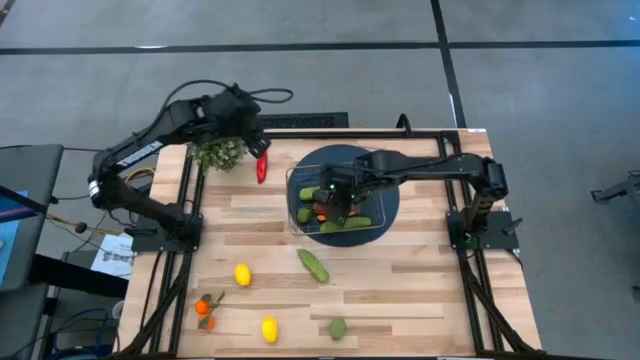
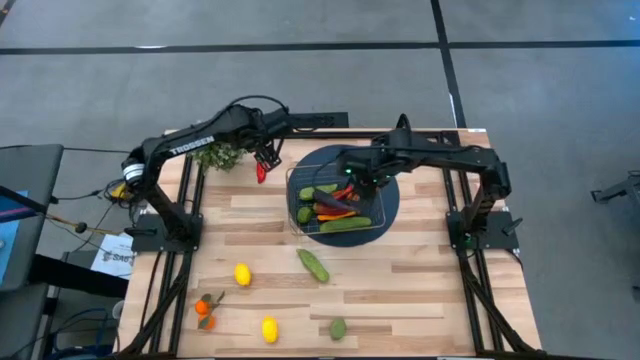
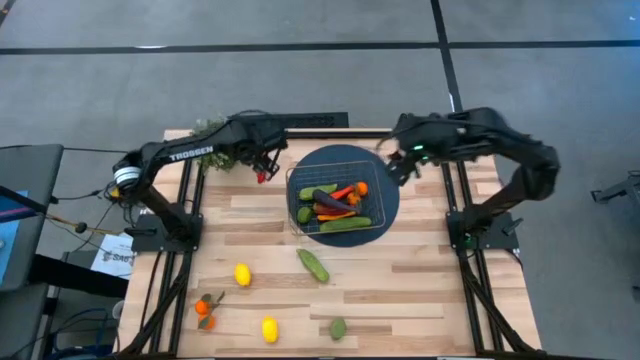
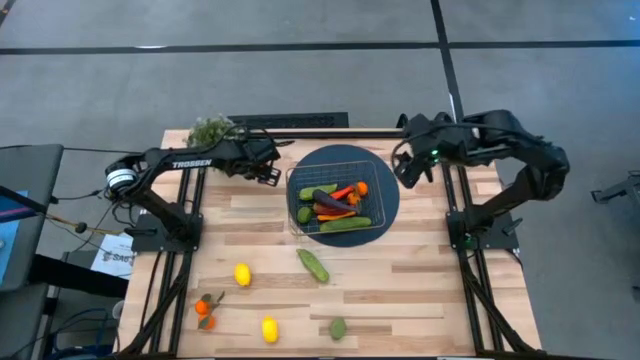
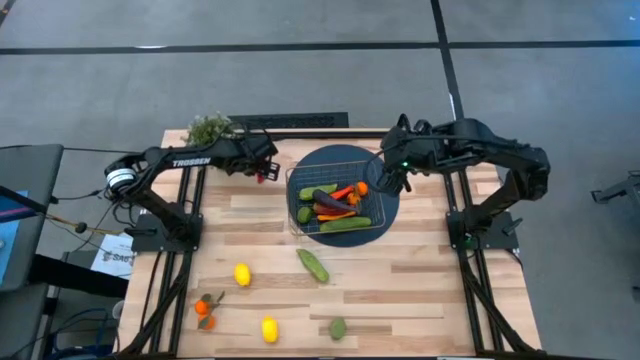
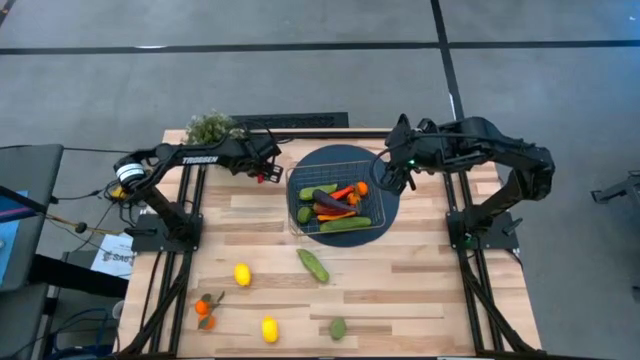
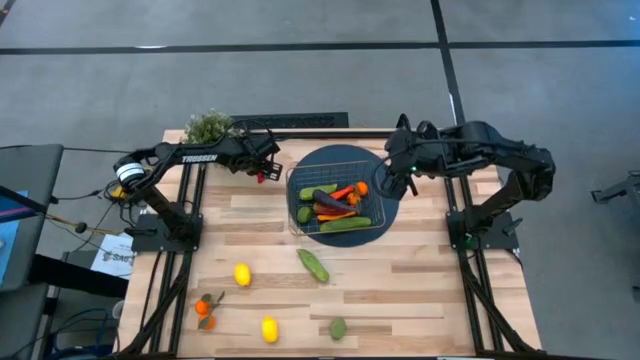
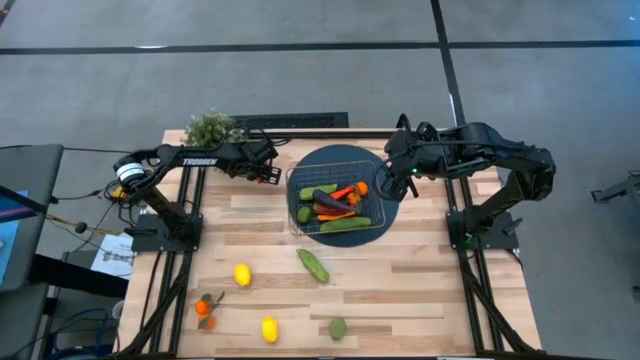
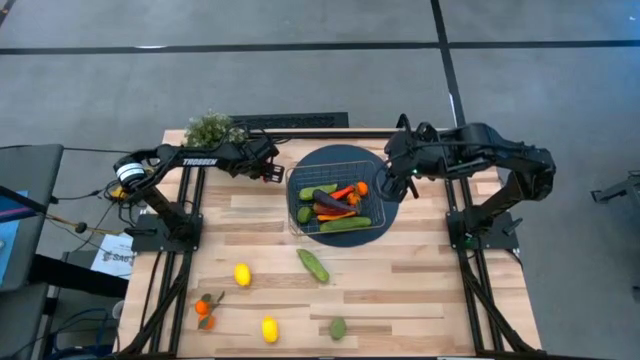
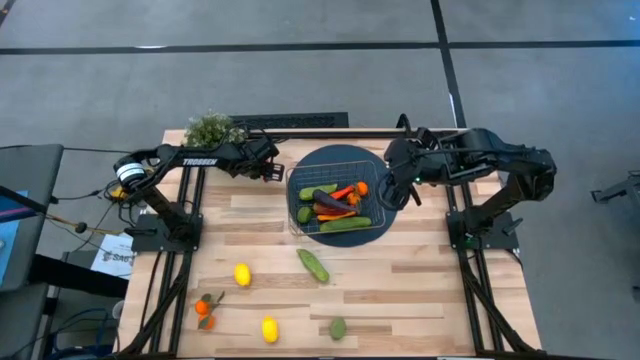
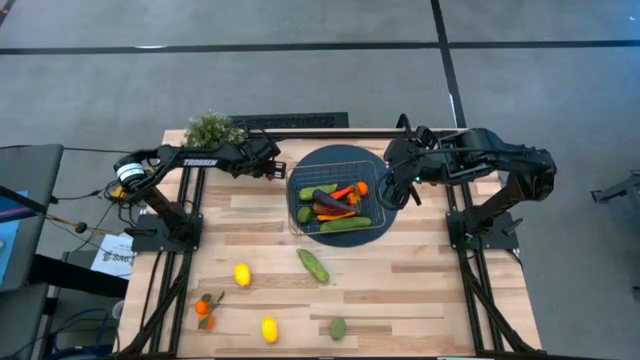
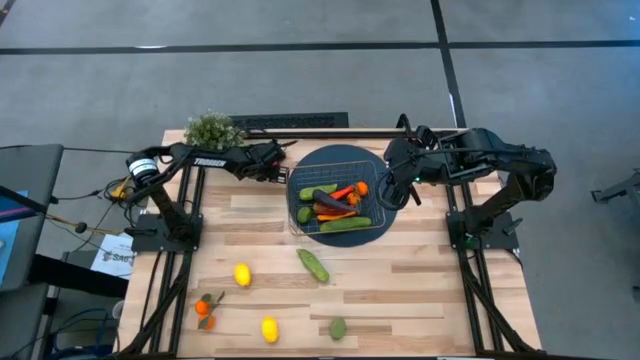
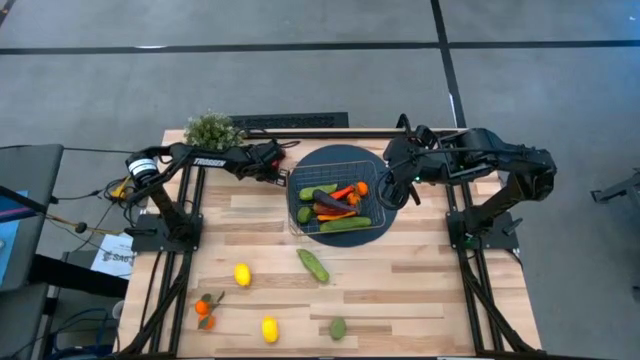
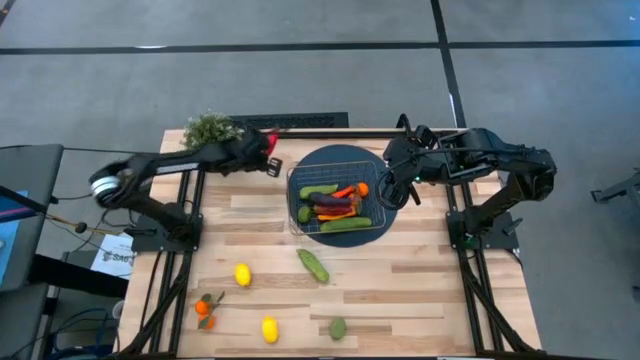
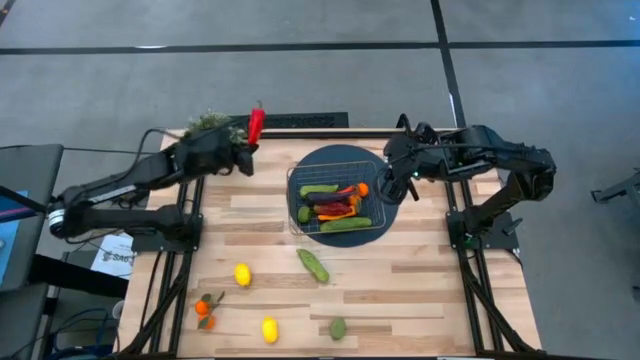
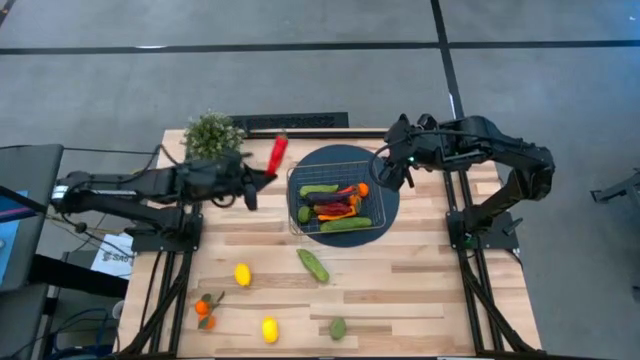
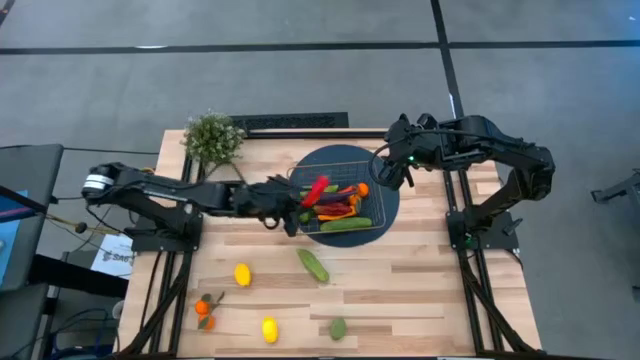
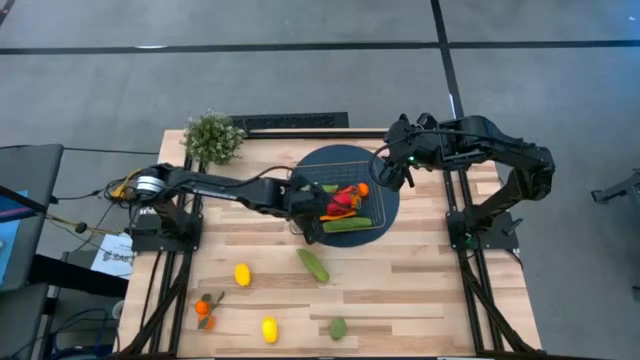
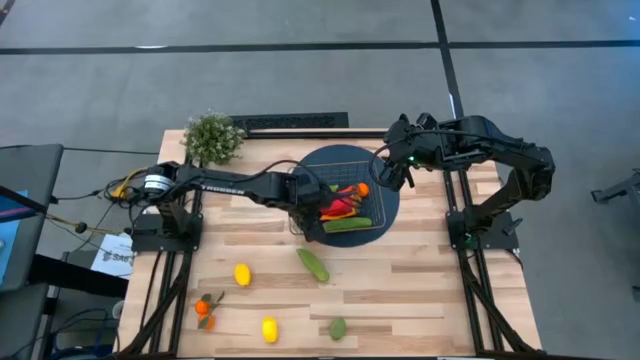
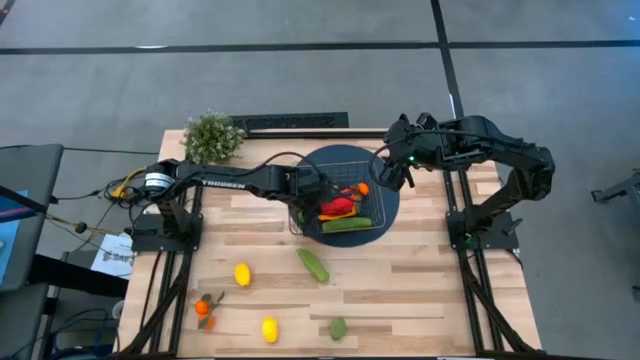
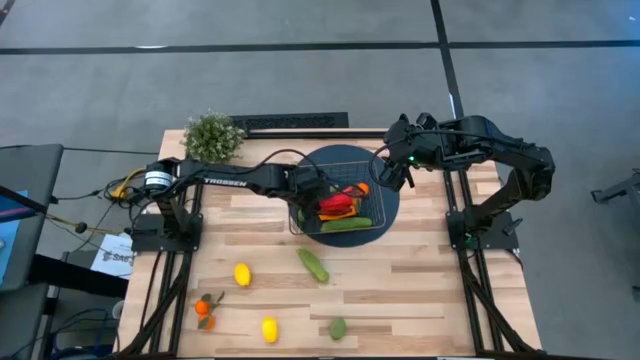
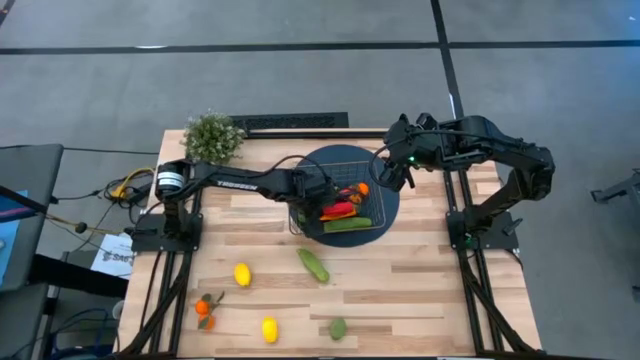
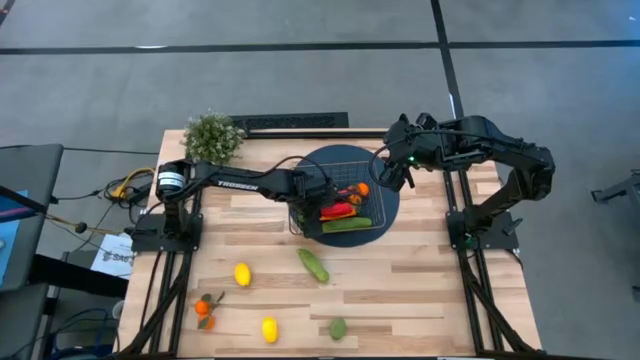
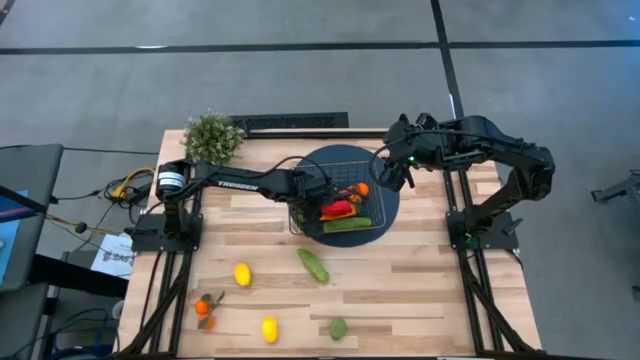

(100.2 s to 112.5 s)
Task: Build produce basket
Put the red chili pepper into the wire basket

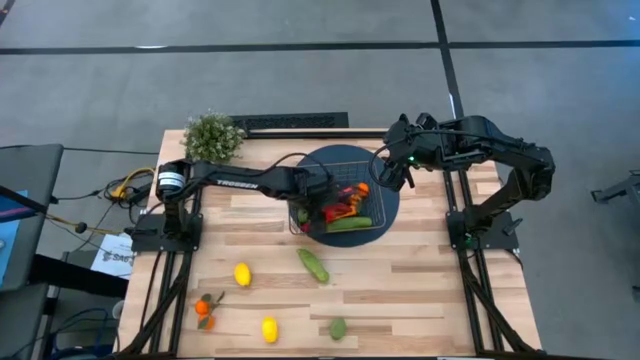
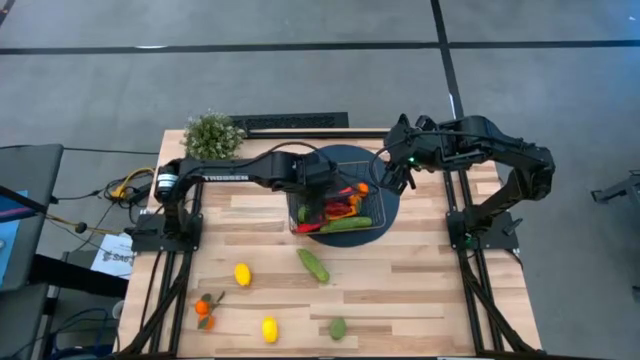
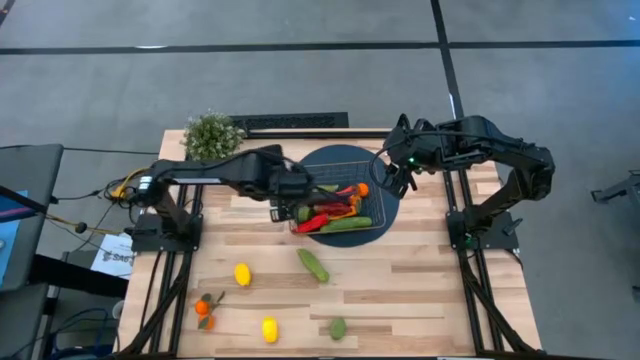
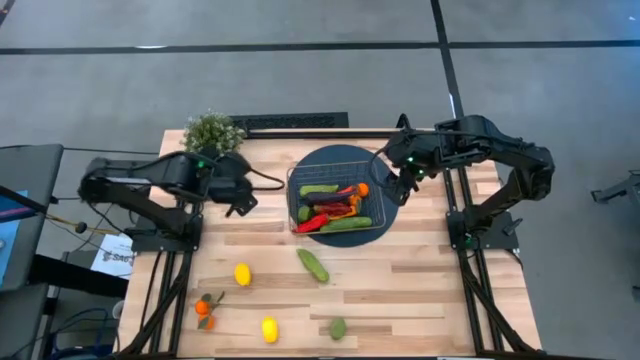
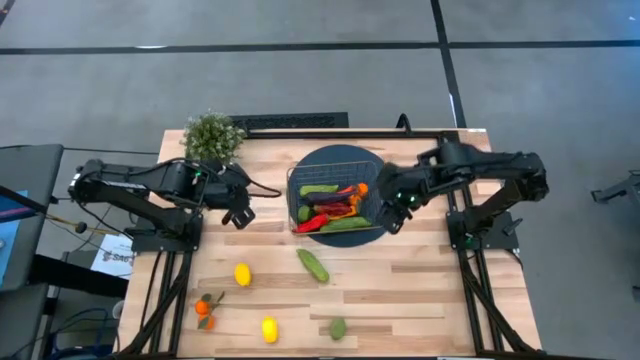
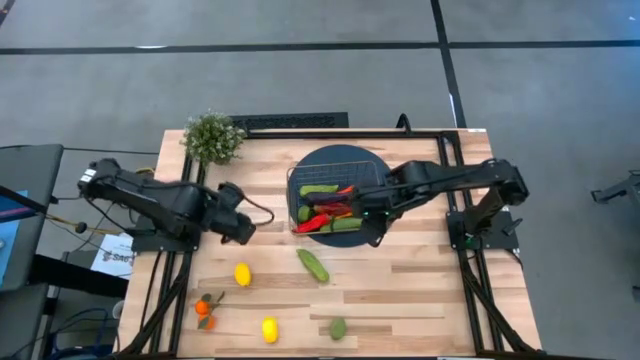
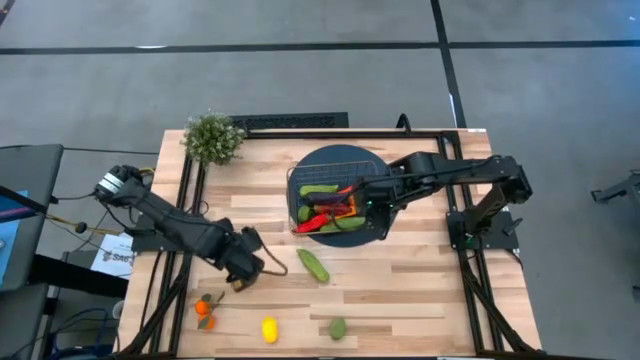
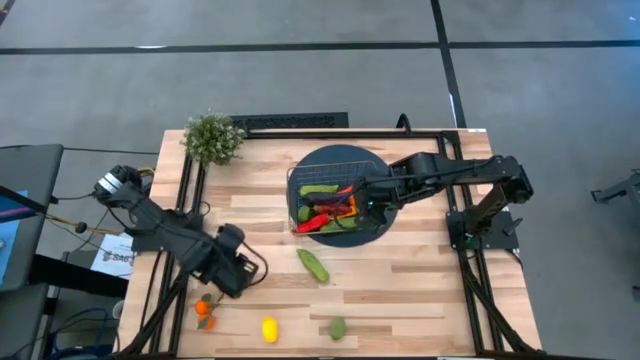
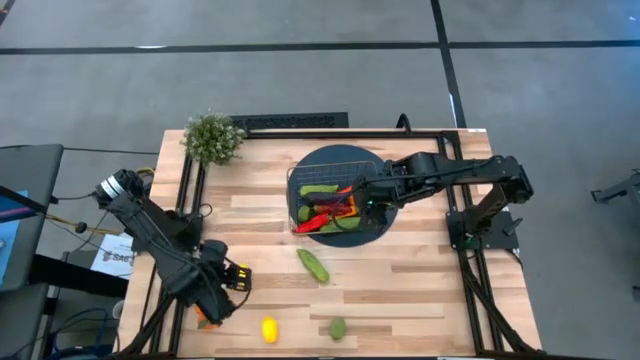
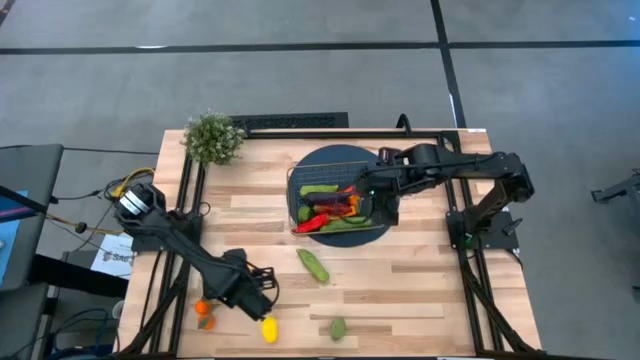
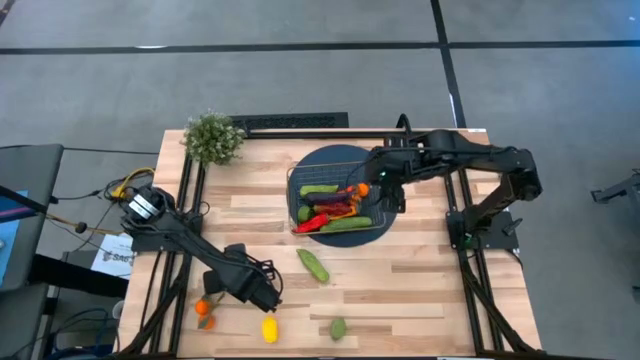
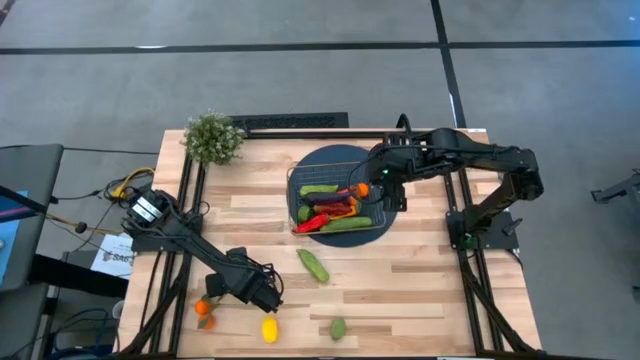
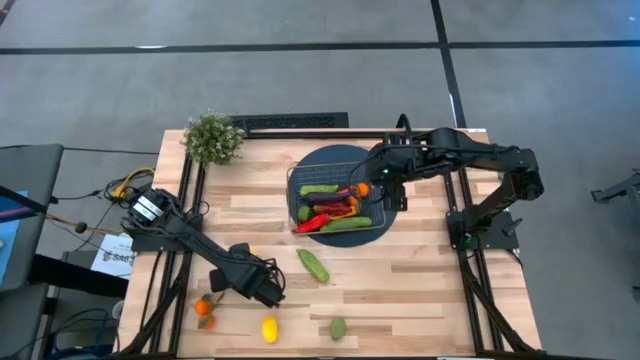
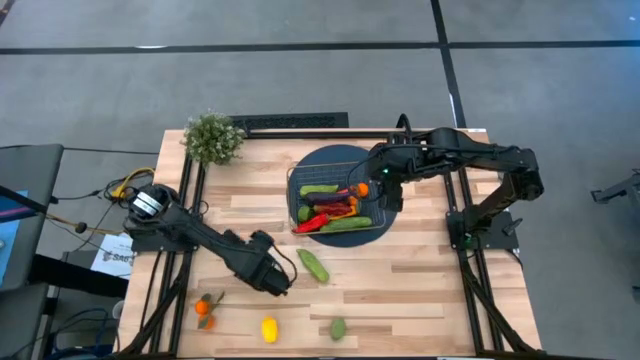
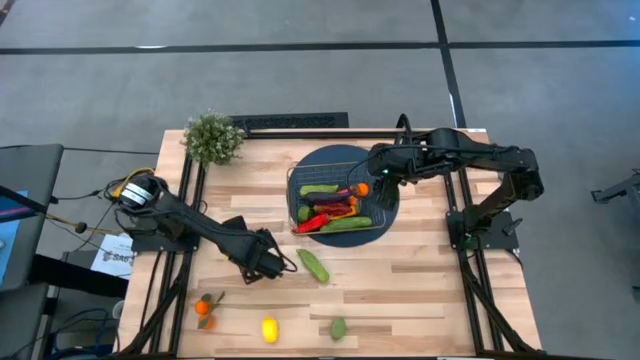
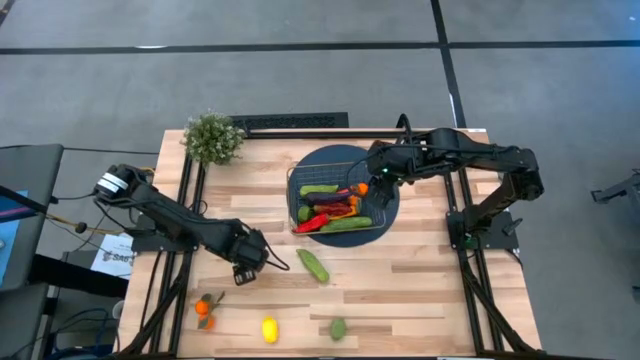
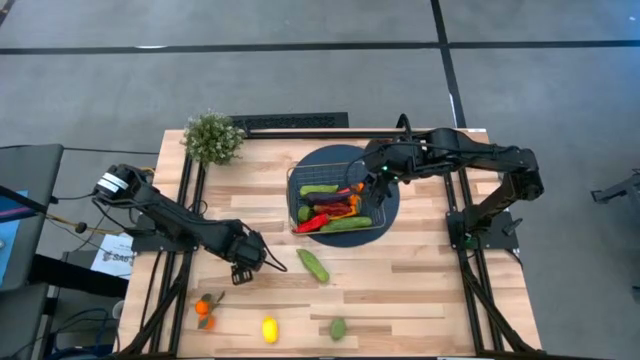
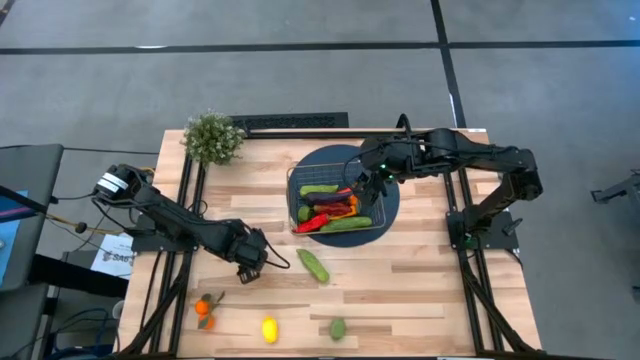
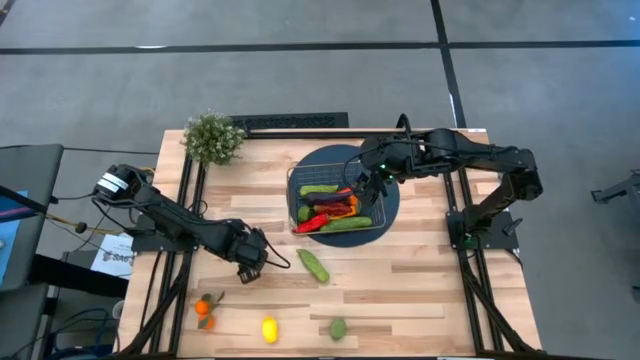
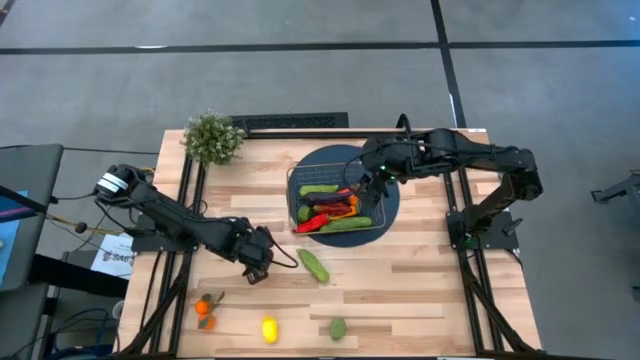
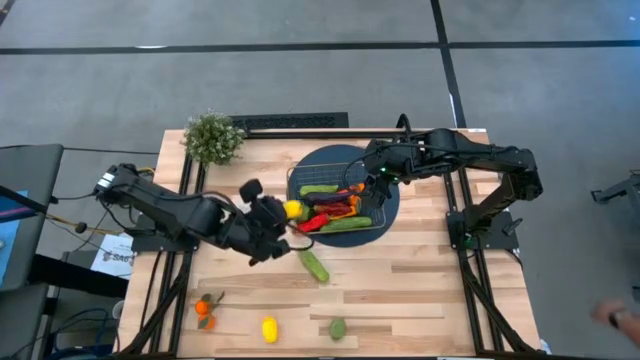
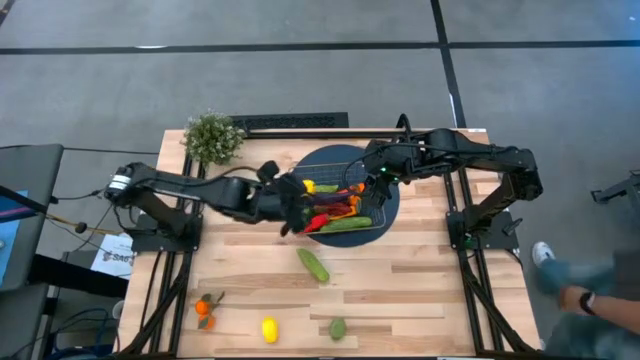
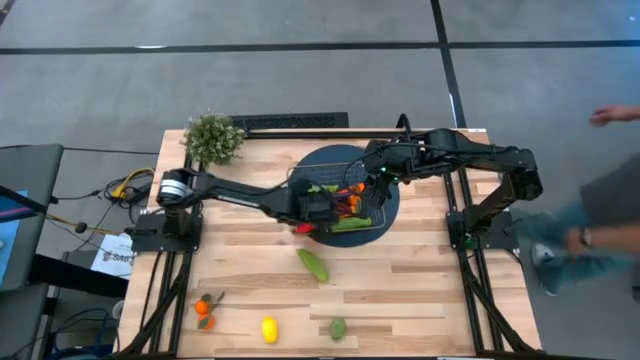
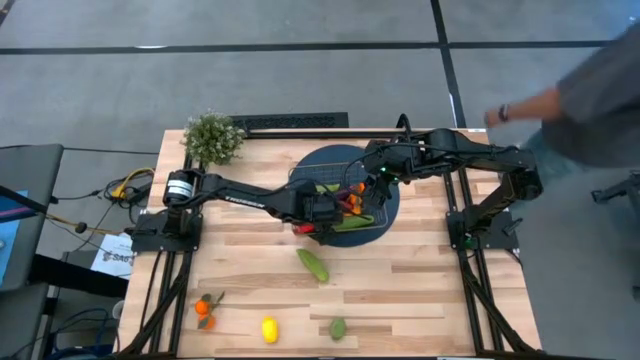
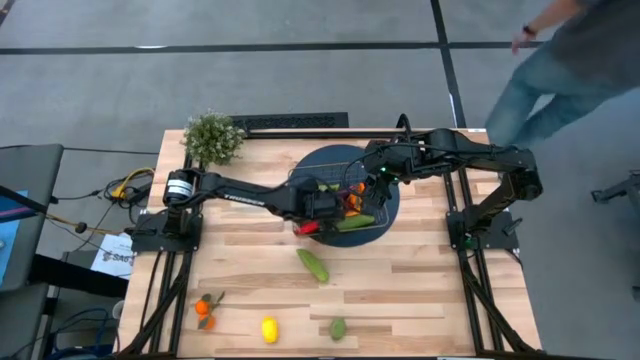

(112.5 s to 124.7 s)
Put the top lemon into the wire basket
